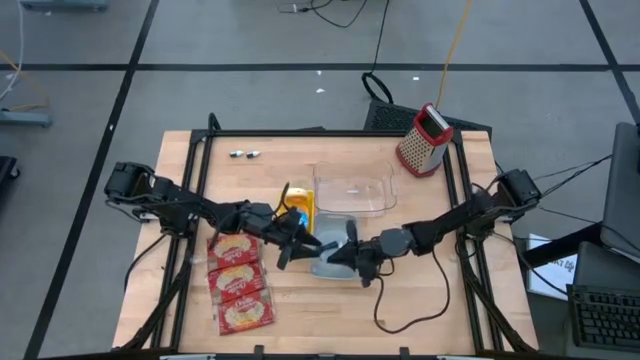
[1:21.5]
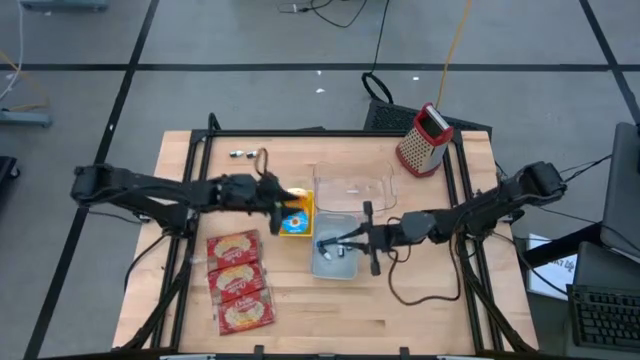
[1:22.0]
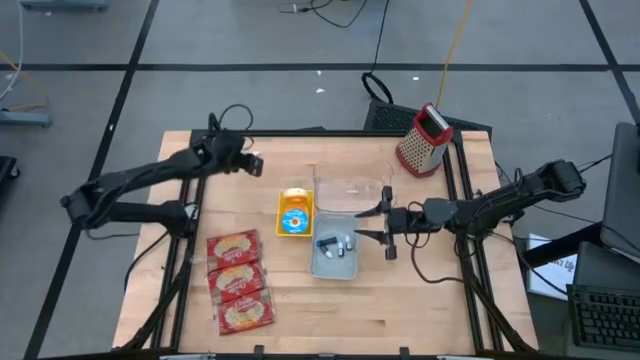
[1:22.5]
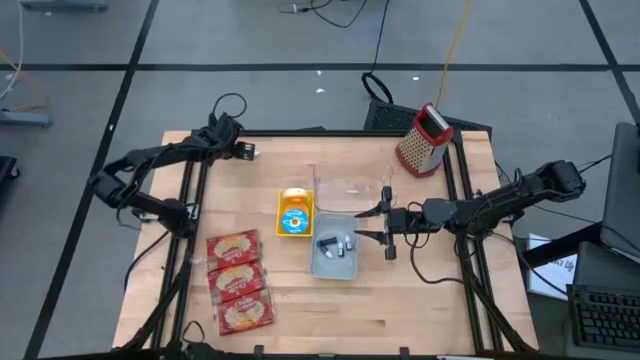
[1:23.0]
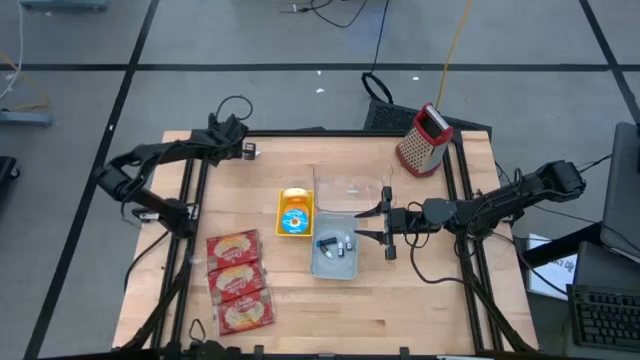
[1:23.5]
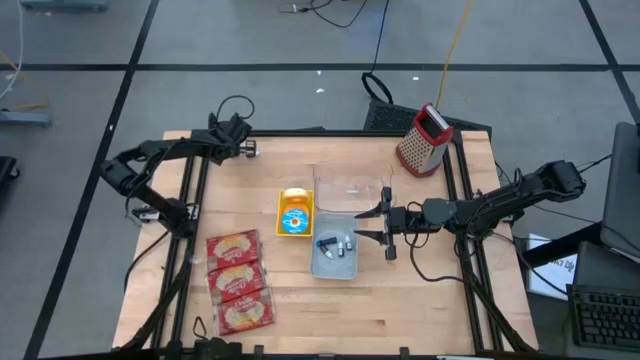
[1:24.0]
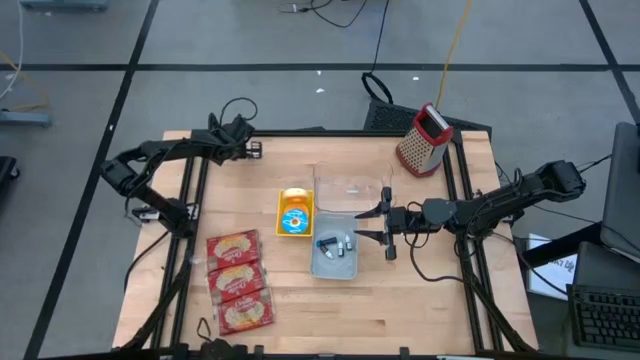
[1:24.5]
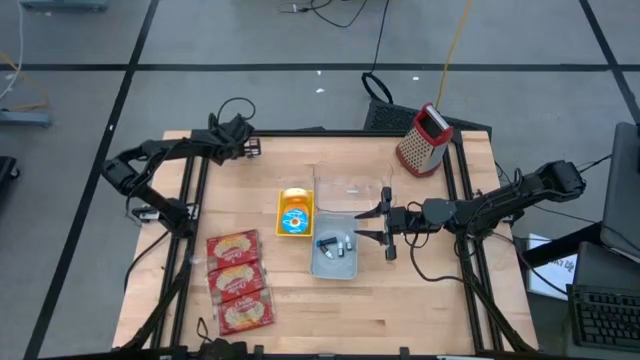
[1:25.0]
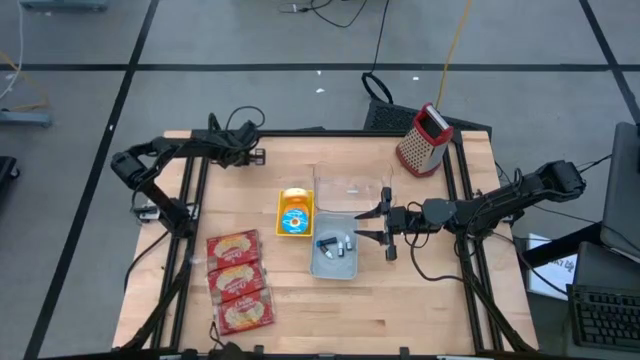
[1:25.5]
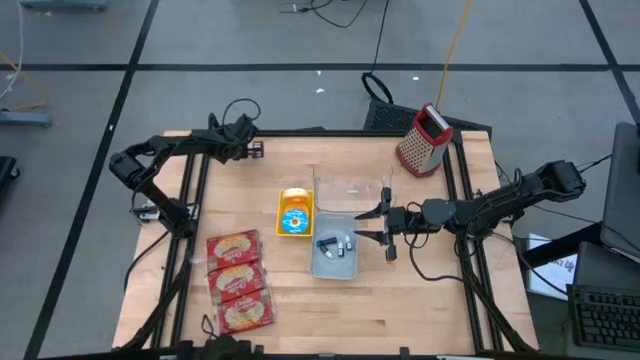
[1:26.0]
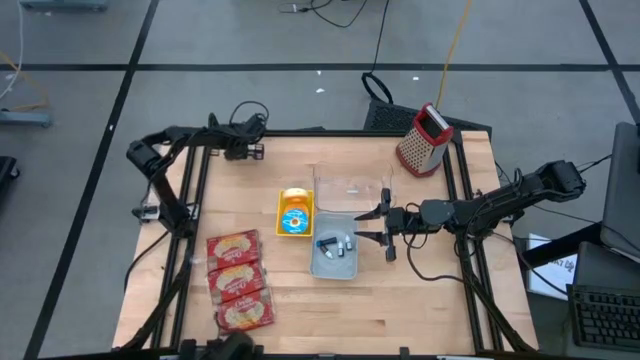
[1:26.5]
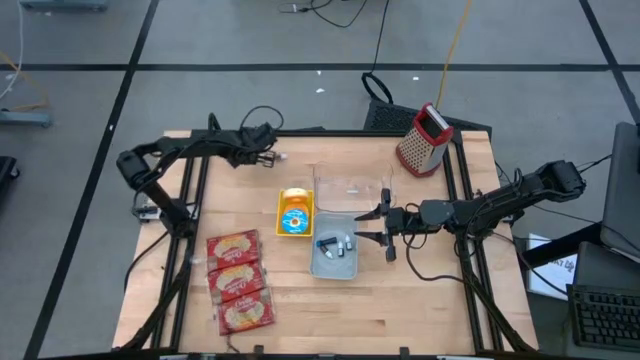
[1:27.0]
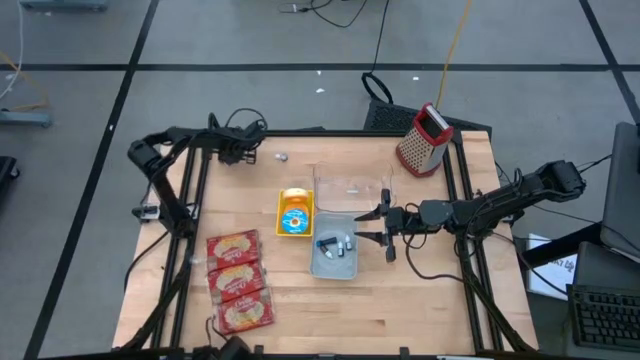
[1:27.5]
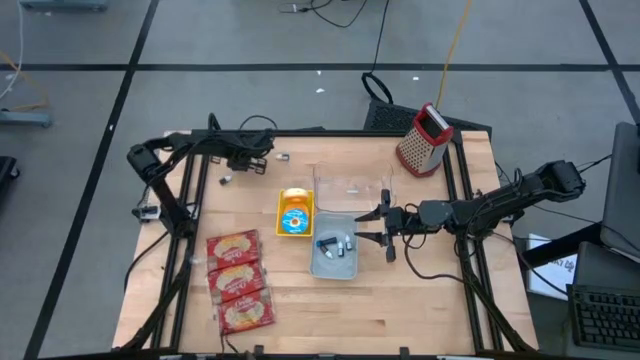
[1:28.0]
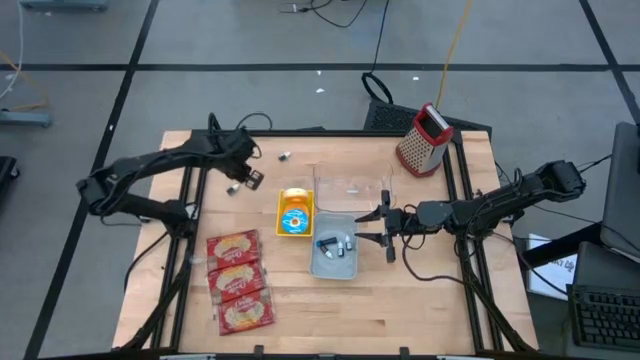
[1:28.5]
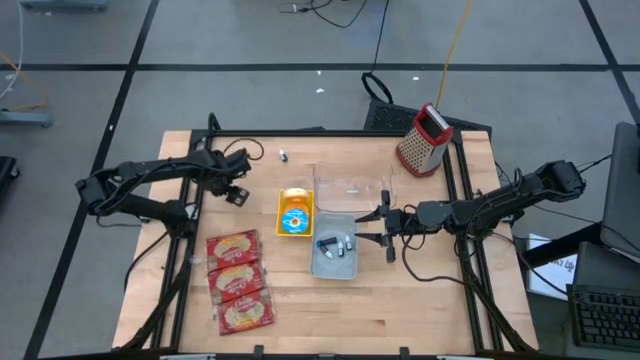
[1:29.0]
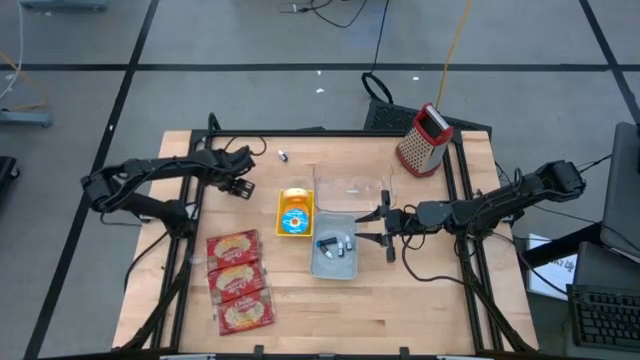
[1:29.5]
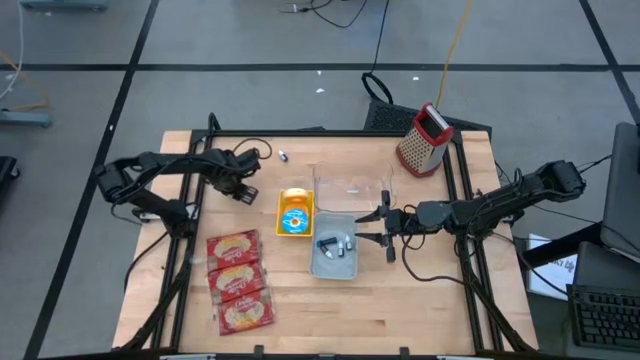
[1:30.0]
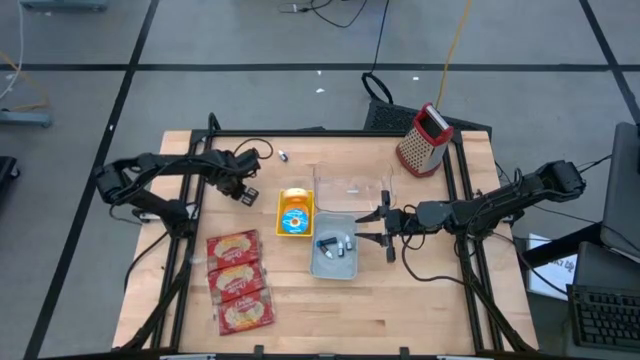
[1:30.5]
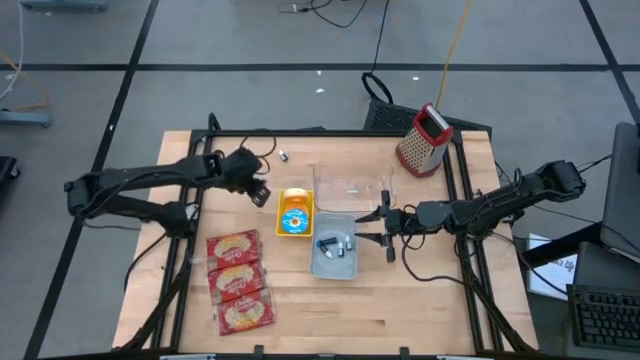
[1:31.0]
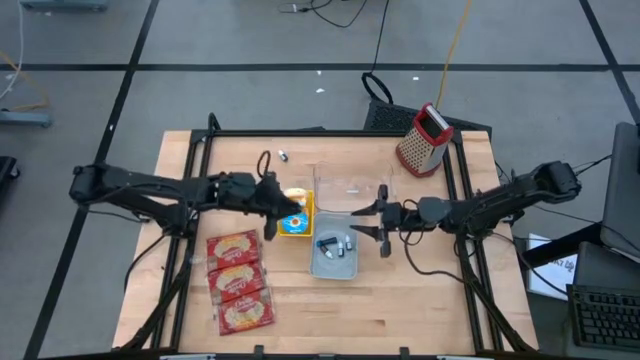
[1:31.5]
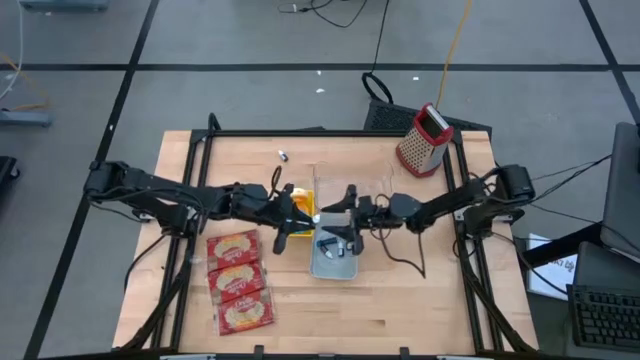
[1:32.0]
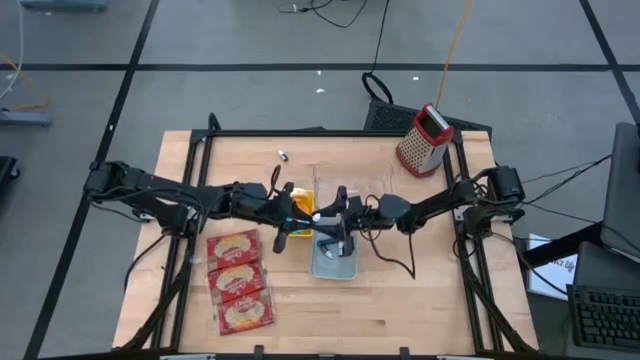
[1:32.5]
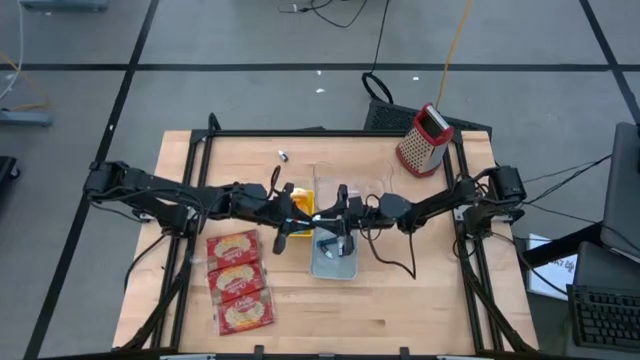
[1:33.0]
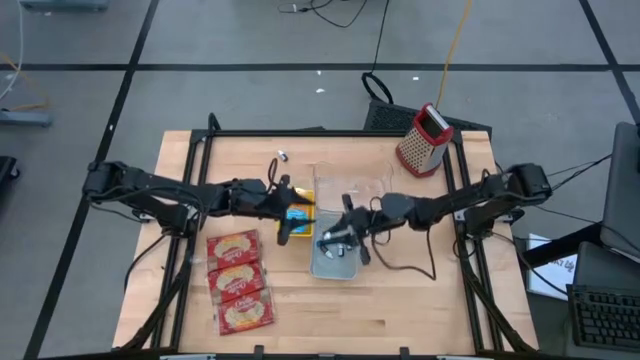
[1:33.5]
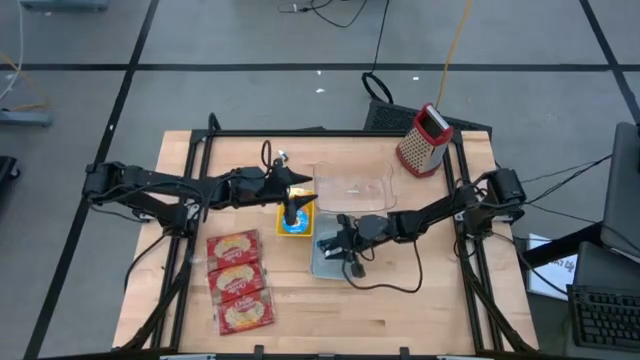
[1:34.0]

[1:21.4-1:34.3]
Put the left green food coloring bottle into the gray bin

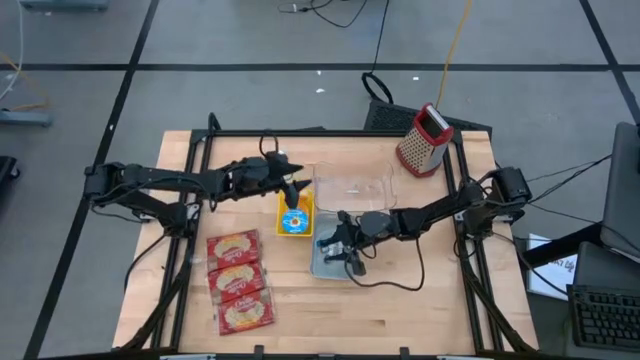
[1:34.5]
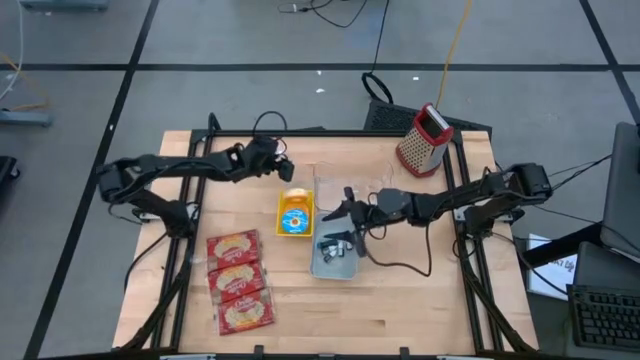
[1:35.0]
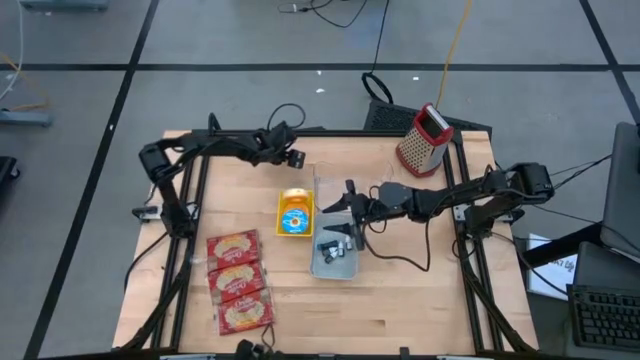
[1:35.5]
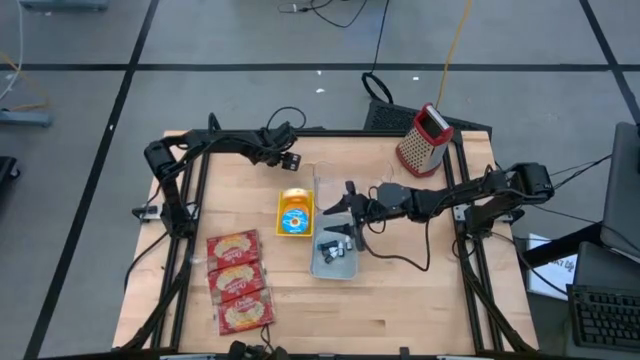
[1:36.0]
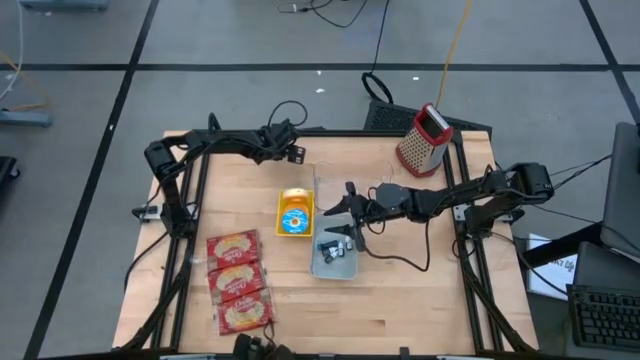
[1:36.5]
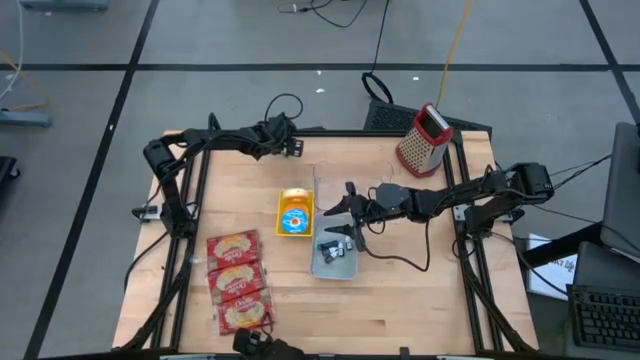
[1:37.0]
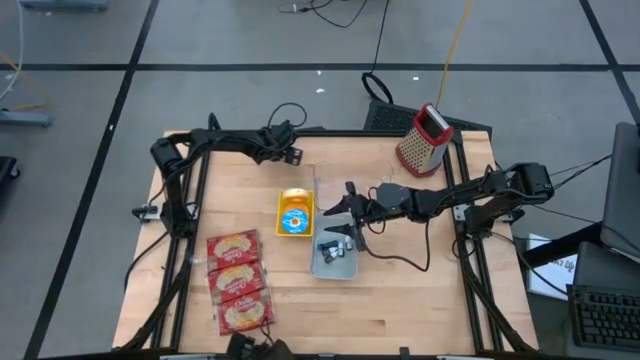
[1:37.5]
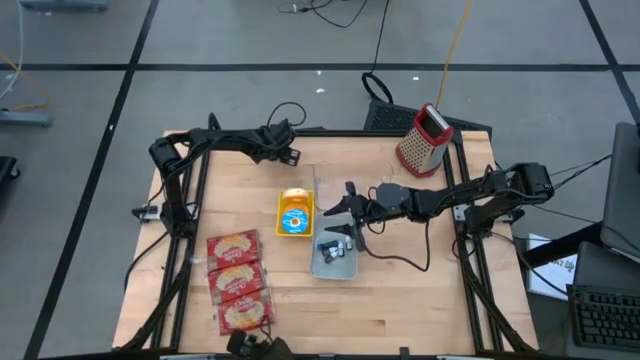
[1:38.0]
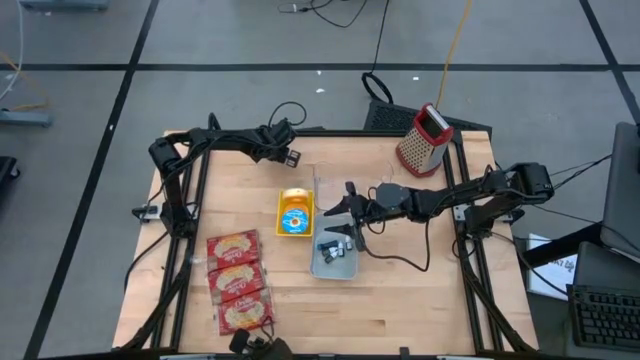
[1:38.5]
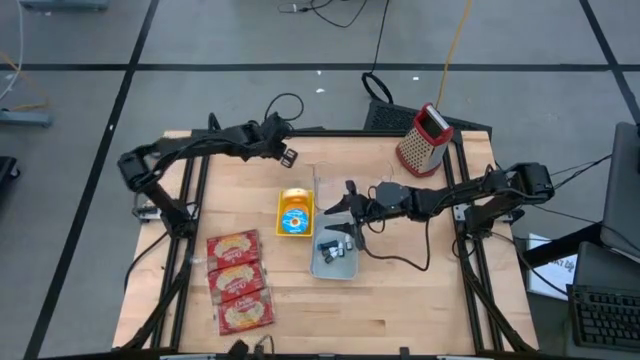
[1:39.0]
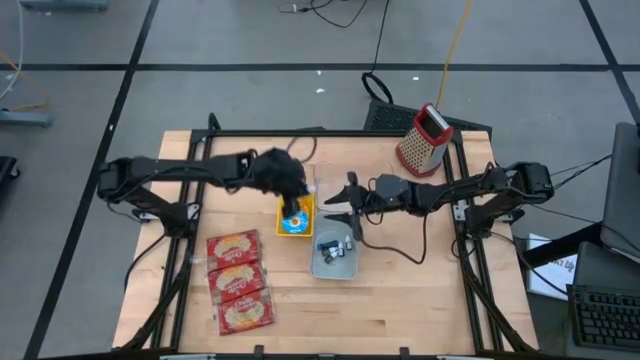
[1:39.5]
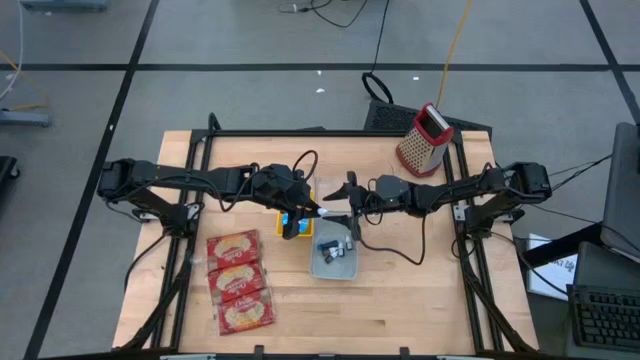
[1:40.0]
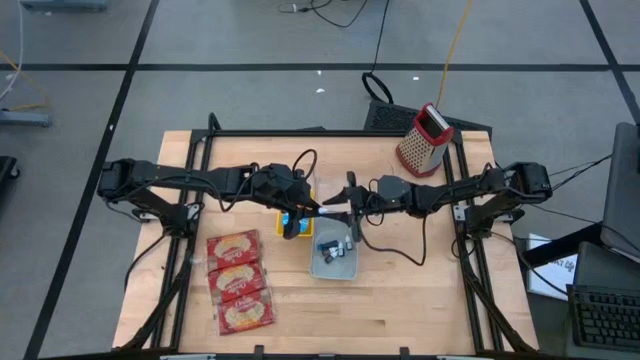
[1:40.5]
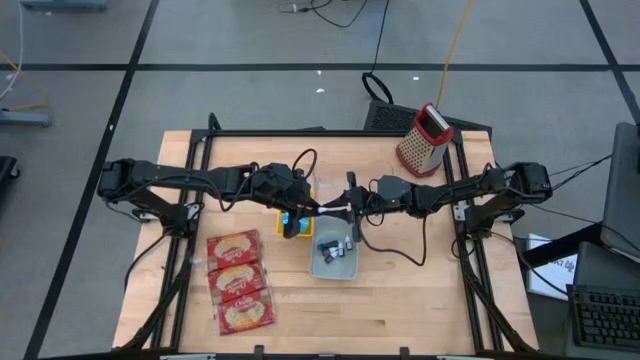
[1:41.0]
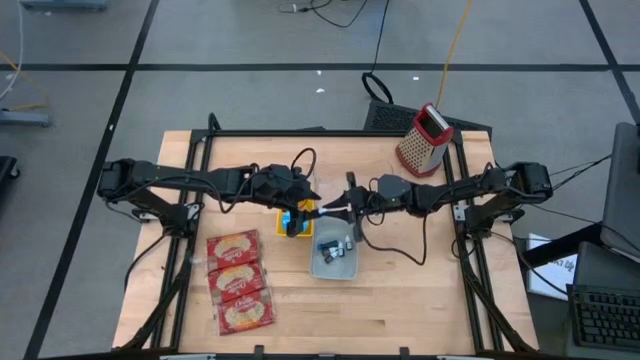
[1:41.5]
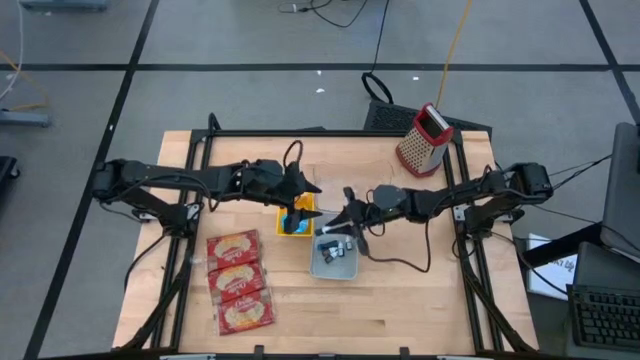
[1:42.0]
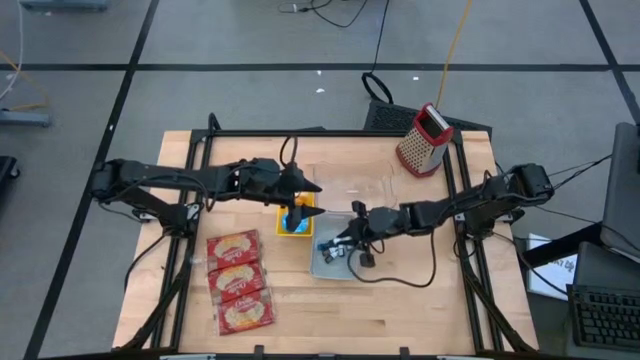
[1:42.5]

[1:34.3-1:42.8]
Put the green food coloring bottle into the gray bin
